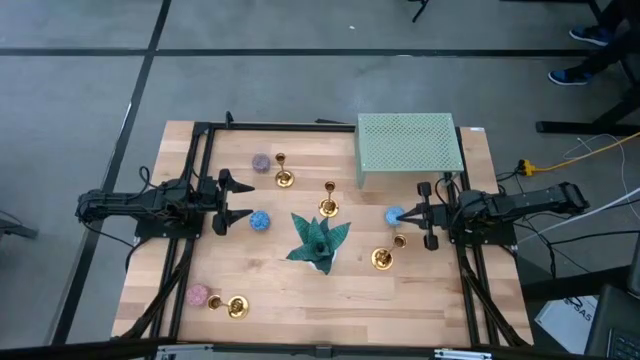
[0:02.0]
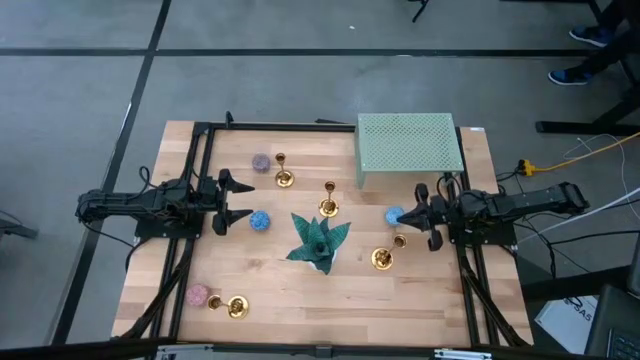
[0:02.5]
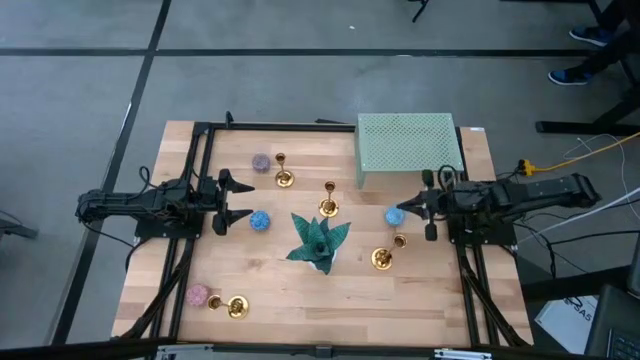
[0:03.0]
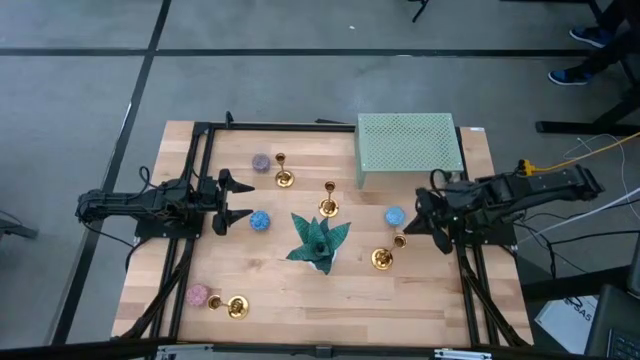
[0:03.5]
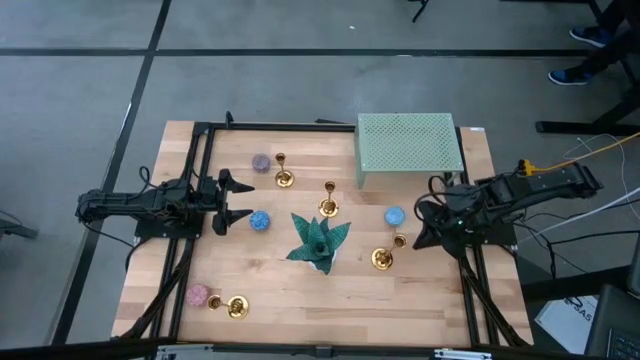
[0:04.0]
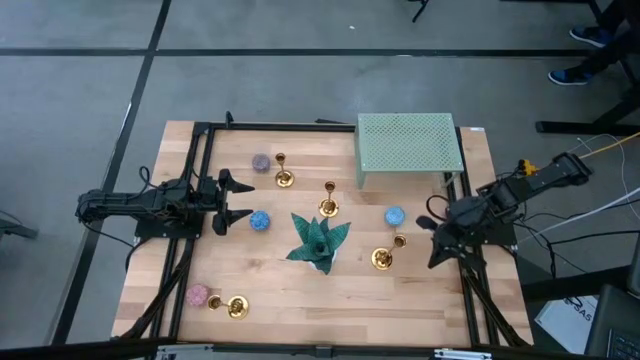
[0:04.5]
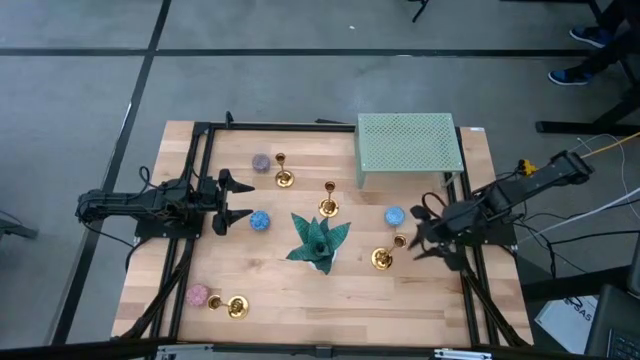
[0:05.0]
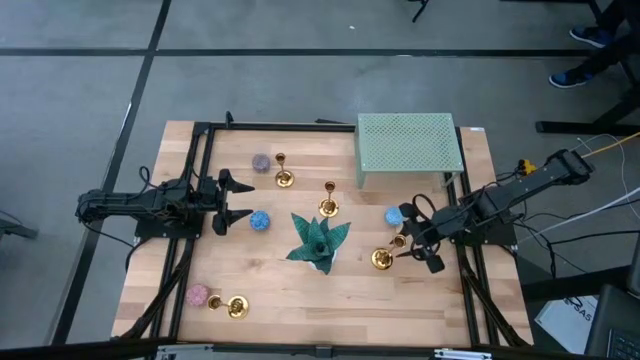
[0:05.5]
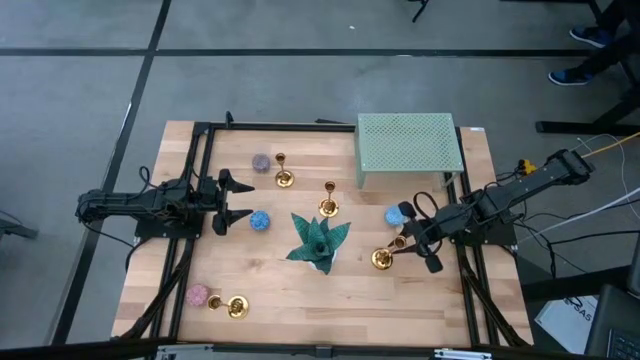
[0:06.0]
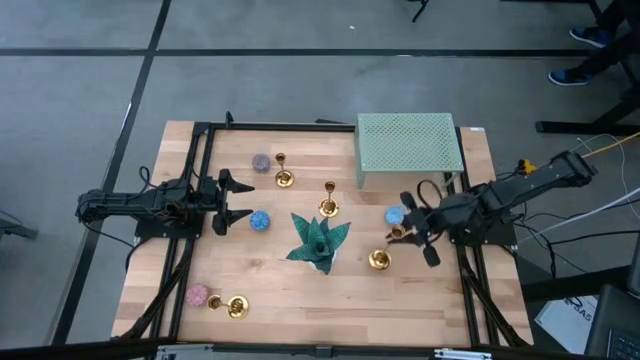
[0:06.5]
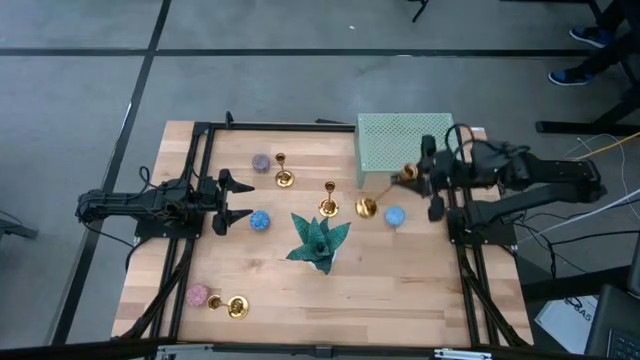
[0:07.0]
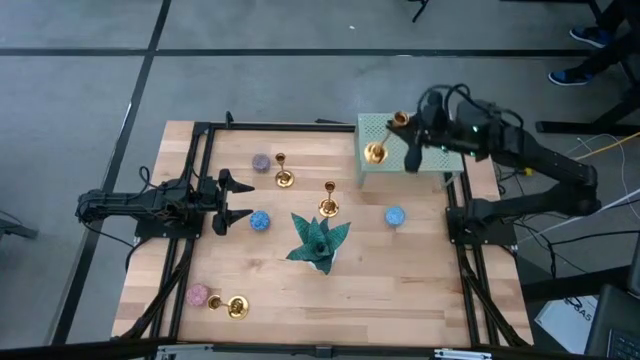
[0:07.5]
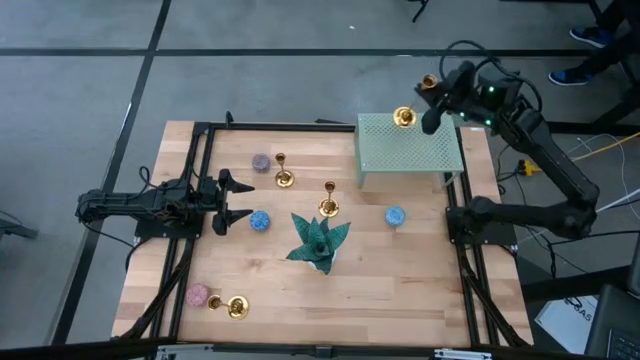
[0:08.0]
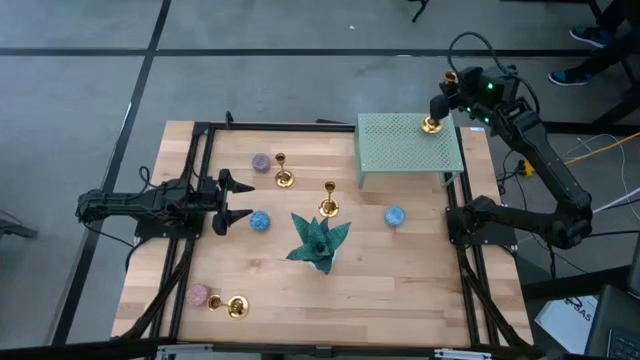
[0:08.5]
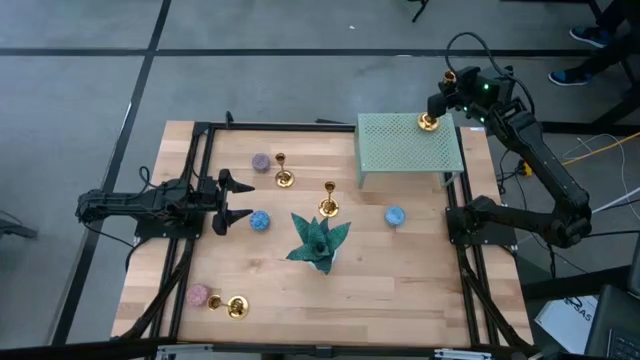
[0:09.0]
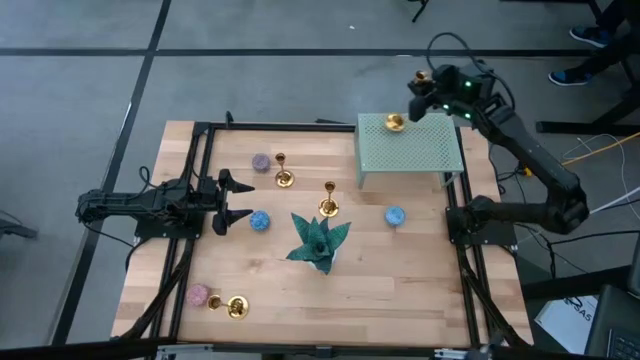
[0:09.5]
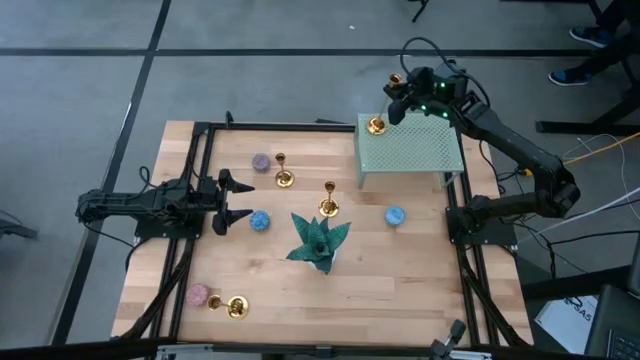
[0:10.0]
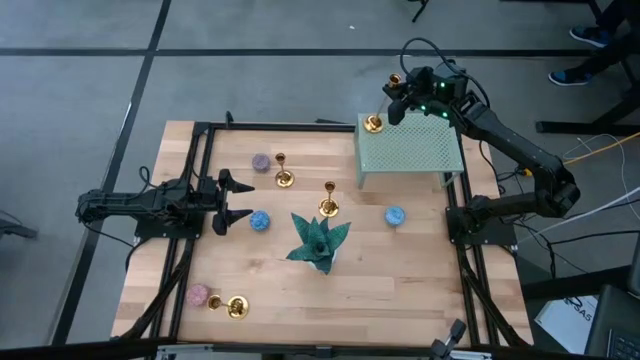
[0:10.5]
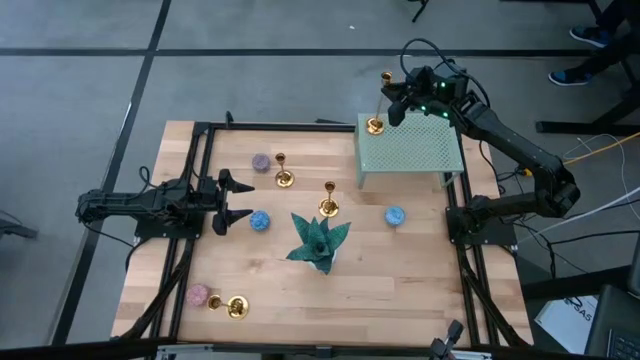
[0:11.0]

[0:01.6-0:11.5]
Task: Stock candles and holders on shelf
Put the gold candle holder on the shelf

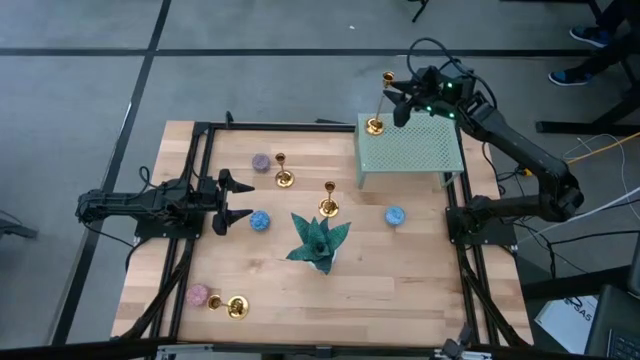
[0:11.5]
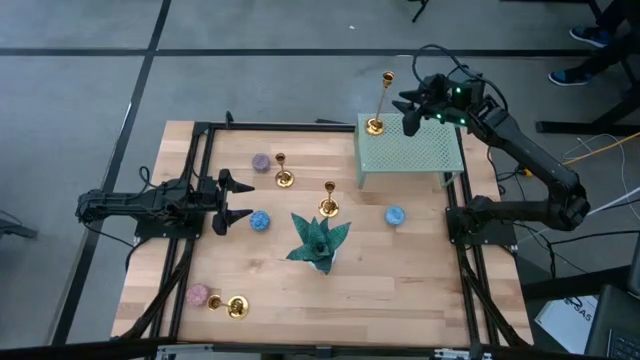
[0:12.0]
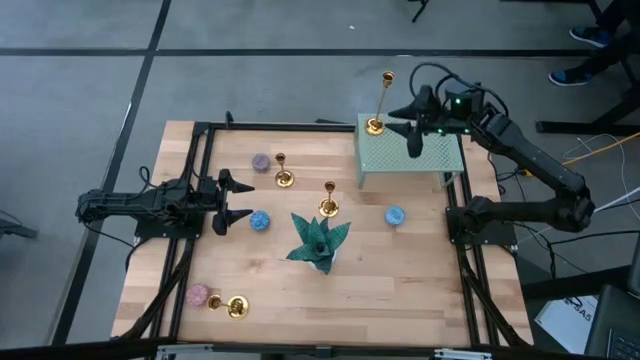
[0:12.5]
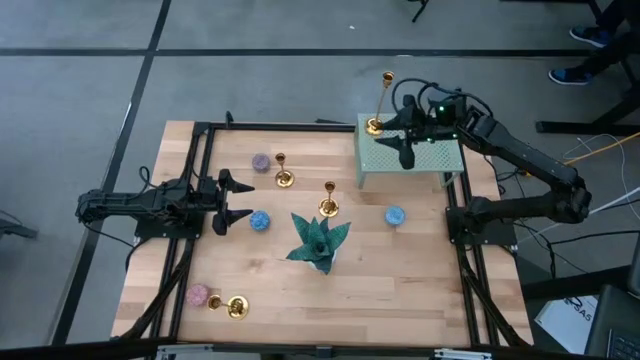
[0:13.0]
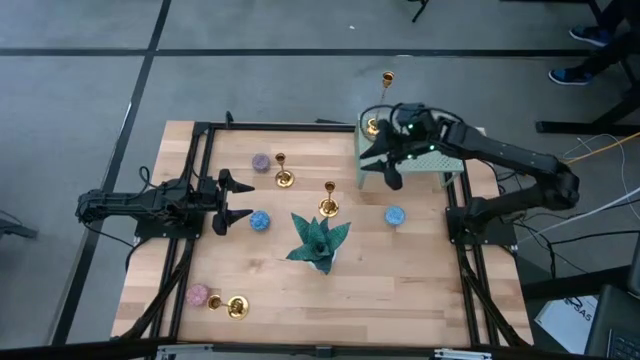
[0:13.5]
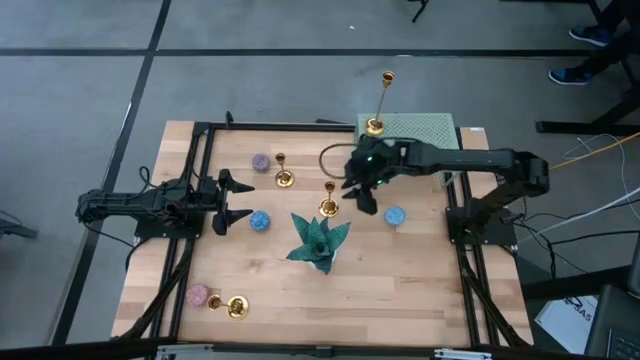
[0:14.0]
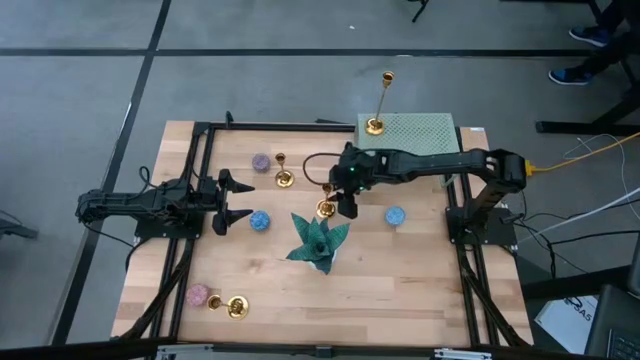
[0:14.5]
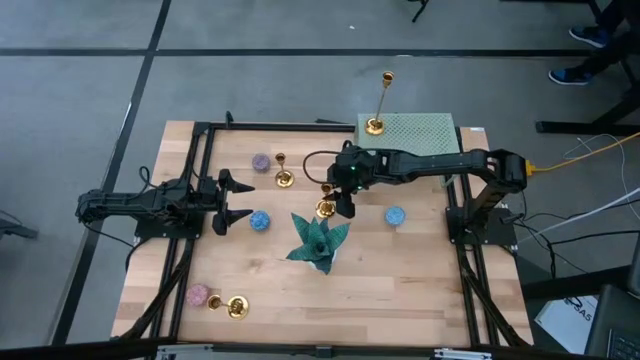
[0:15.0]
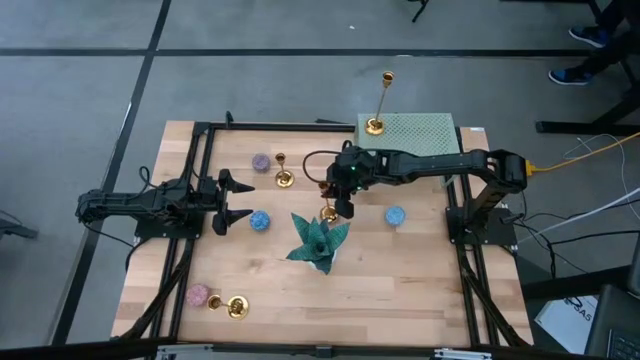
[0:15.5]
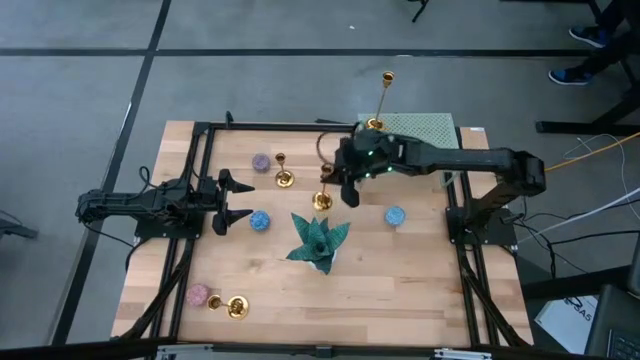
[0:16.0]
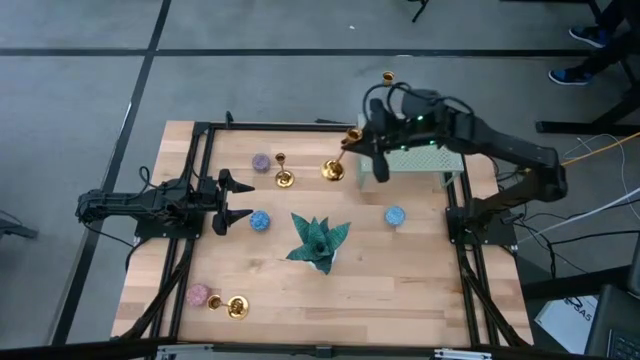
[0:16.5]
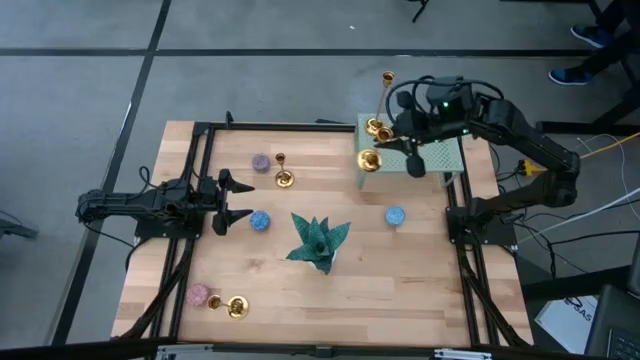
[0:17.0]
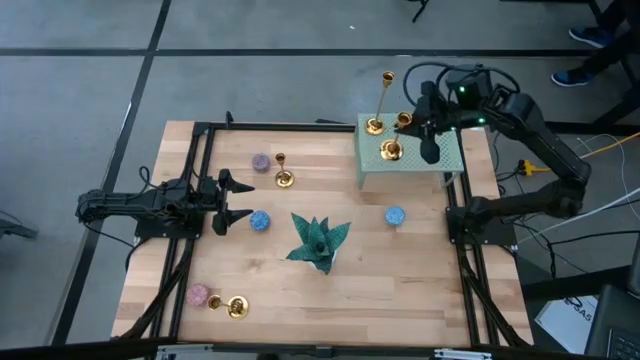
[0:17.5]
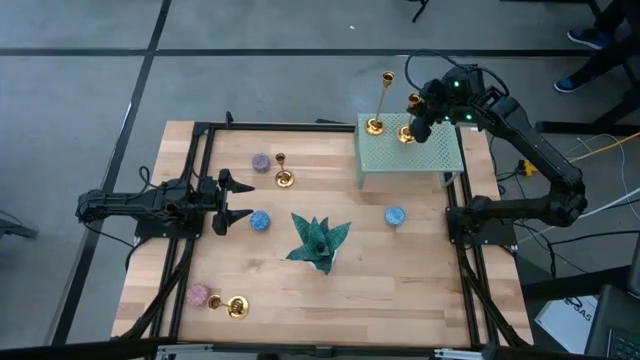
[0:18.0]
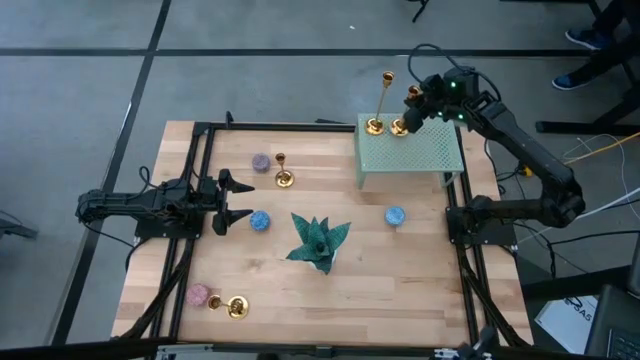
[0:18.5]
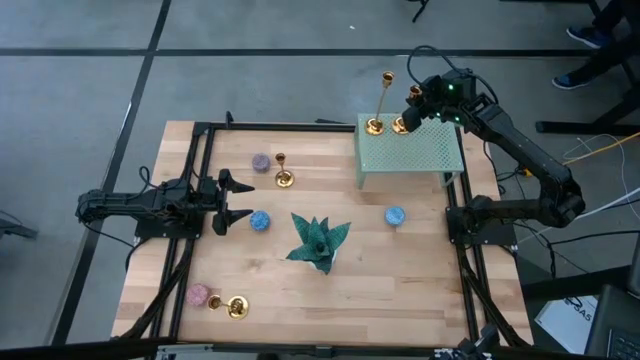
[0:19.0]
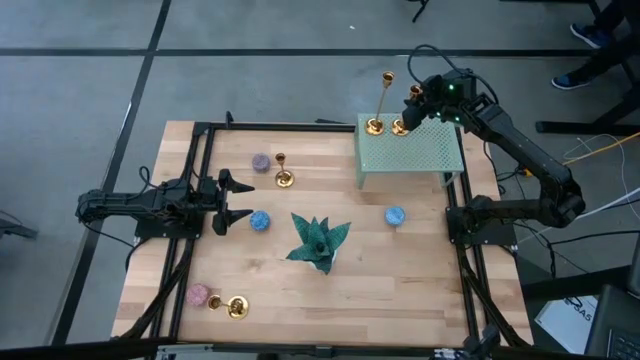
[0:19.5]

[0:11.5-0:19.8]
Align the gold candle holder with the other gold candle holder on the shelf

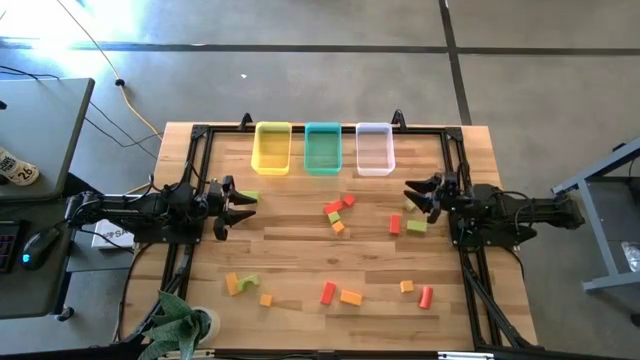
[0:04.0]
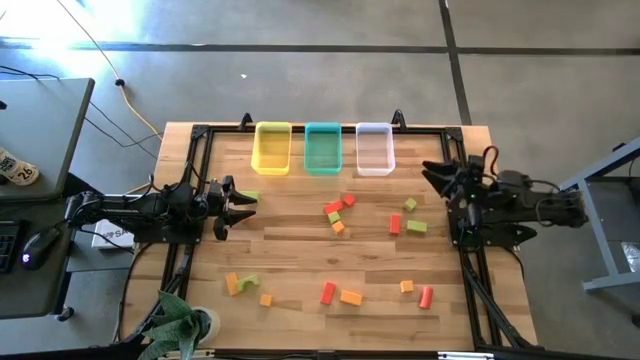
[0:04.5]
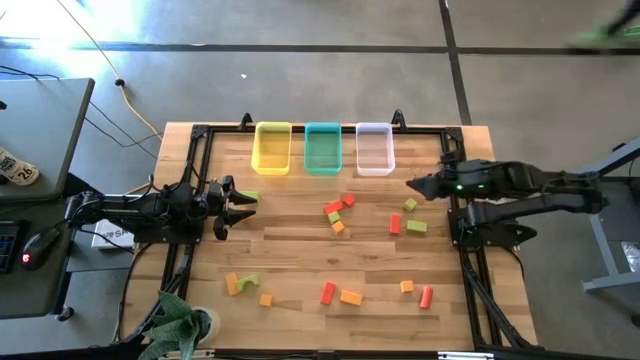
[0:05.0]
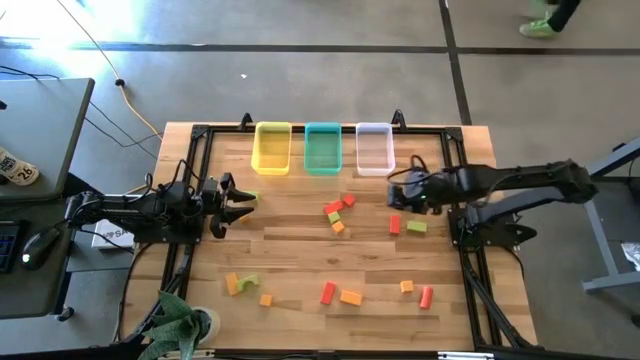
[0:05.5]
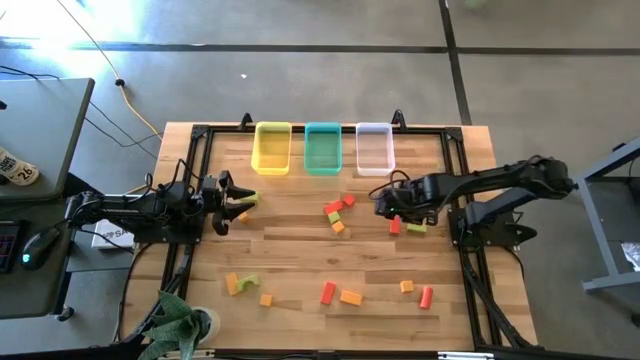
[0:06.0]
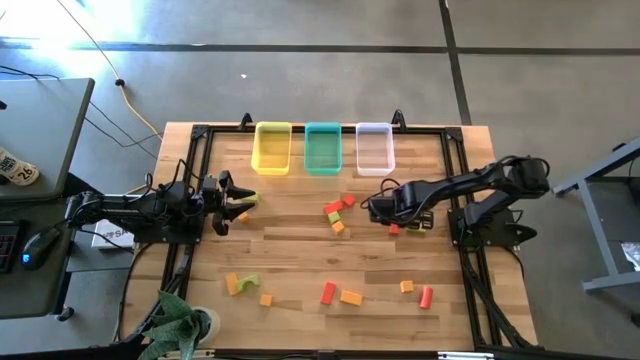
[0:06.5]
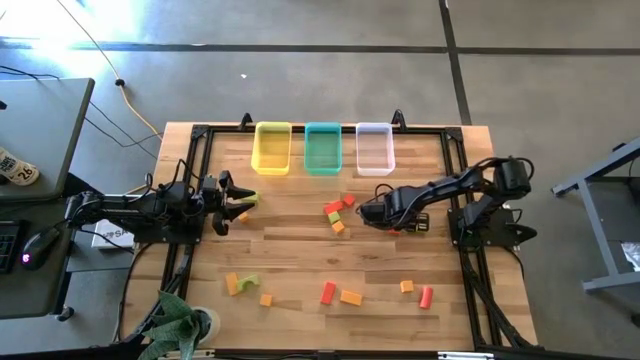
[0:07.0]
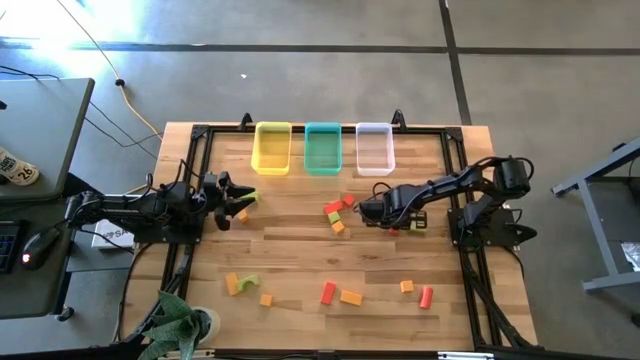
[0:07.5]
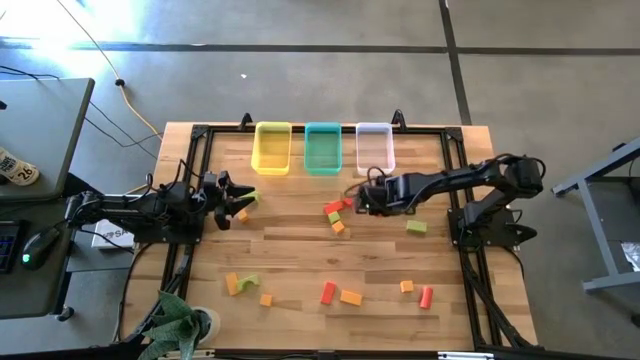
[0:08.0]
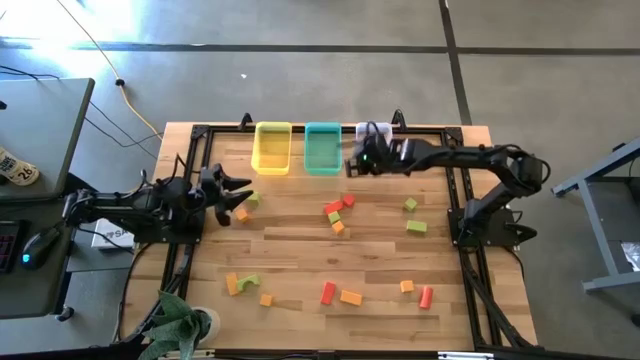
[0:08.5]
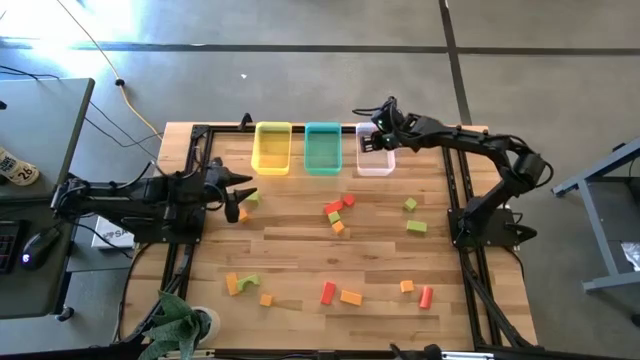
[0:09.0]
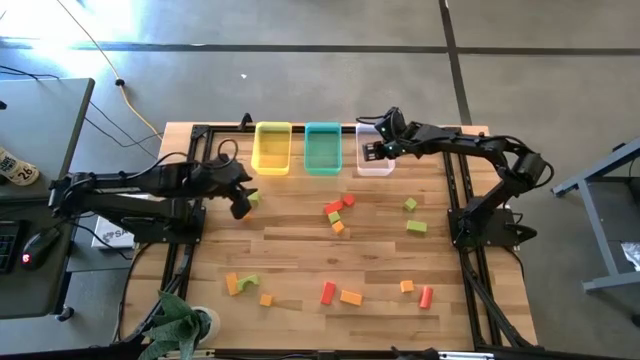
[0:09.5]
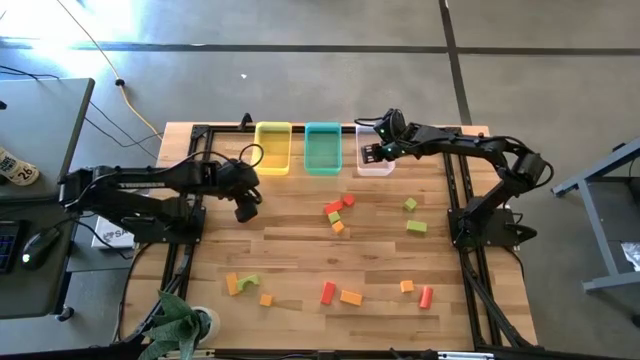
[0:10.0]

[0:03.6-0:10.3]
Task: Sort & place blocks by color
Put the orange block into the white bin
